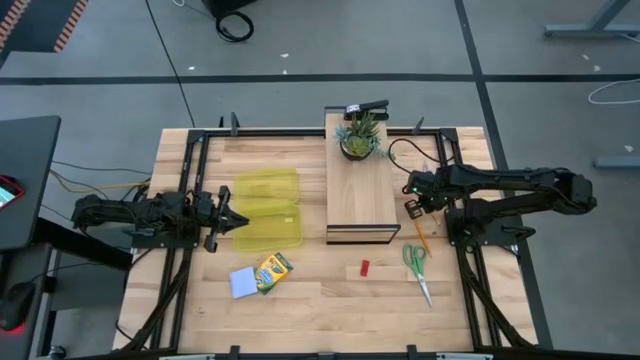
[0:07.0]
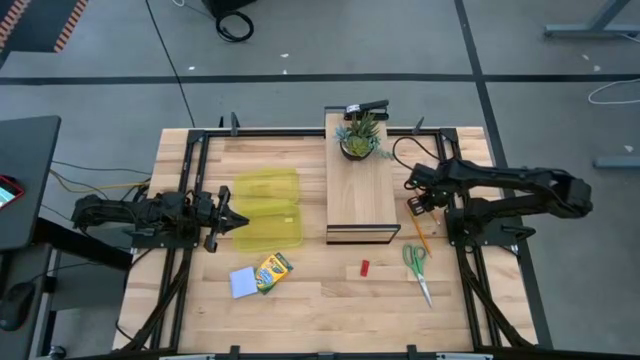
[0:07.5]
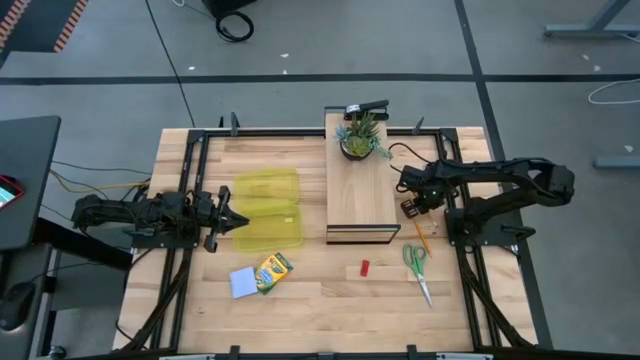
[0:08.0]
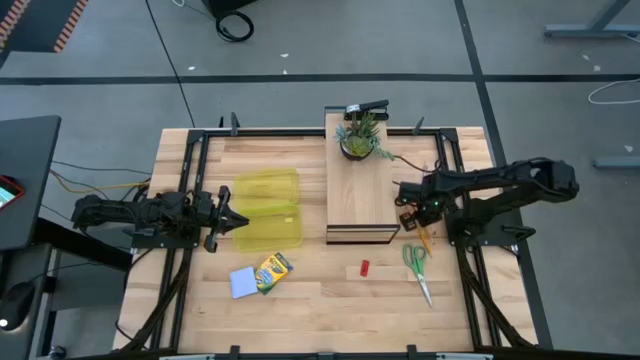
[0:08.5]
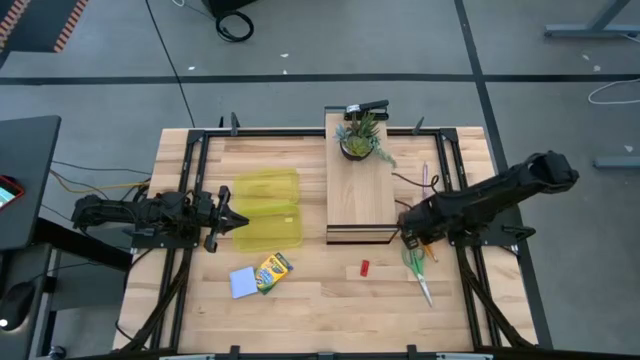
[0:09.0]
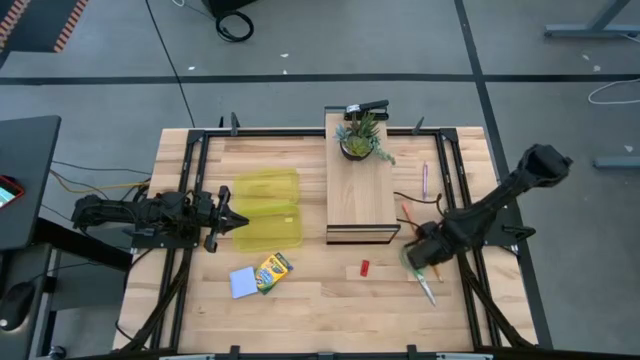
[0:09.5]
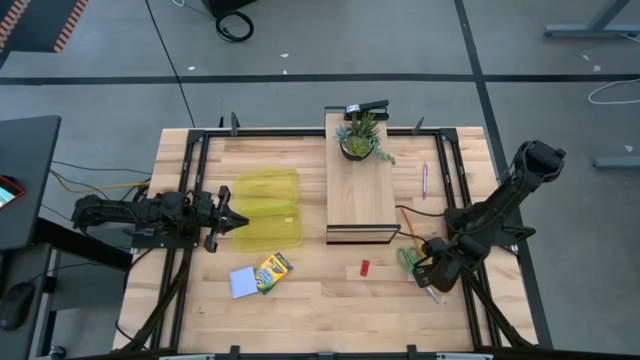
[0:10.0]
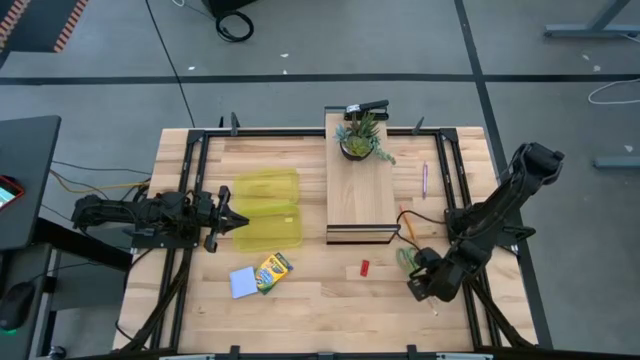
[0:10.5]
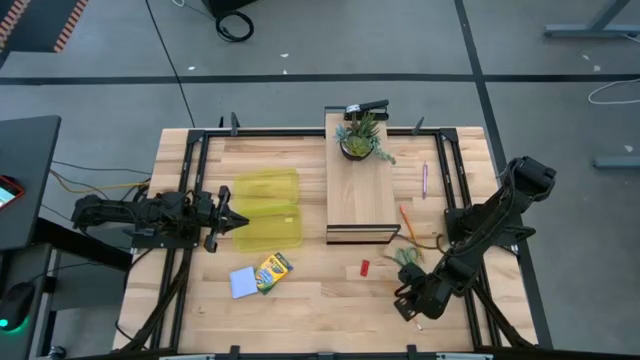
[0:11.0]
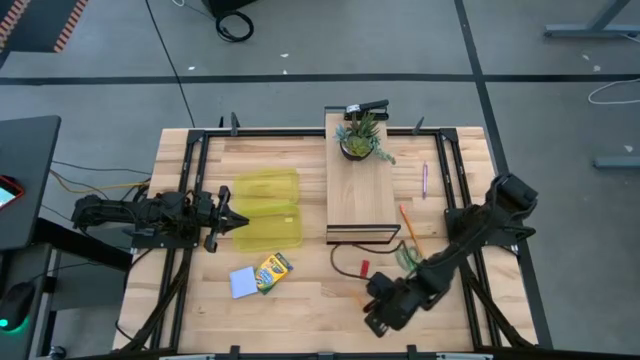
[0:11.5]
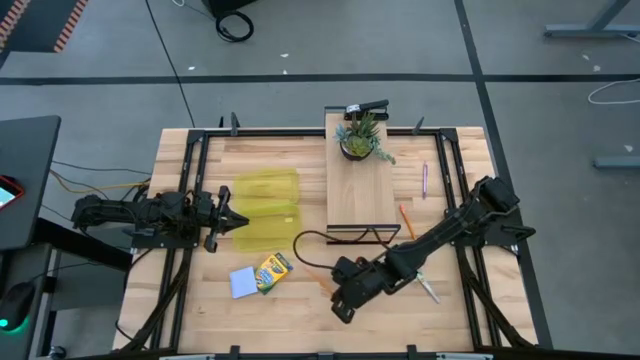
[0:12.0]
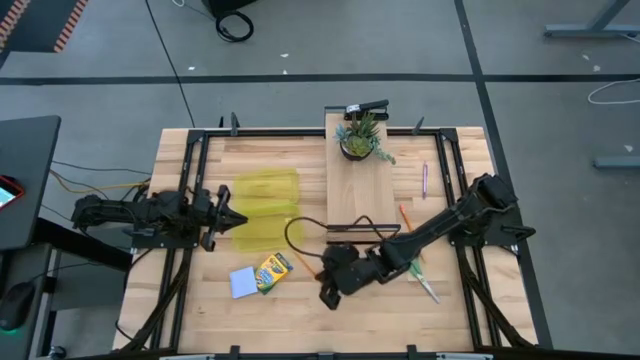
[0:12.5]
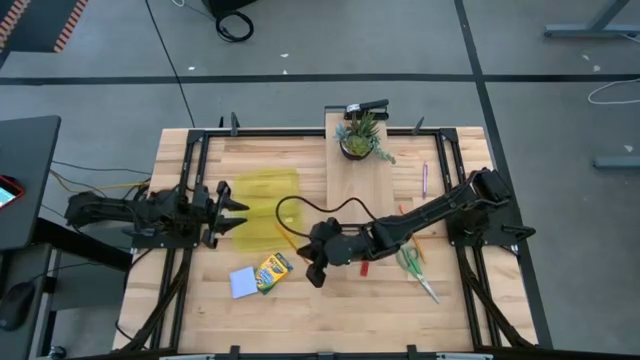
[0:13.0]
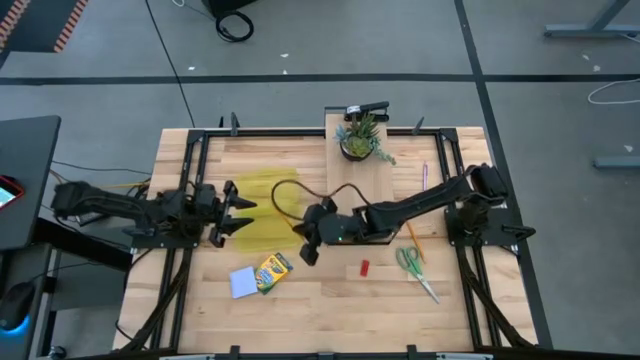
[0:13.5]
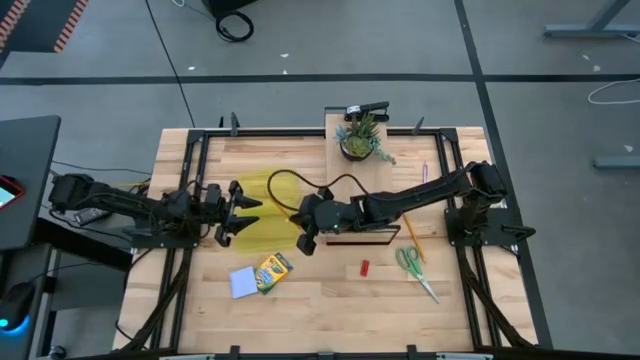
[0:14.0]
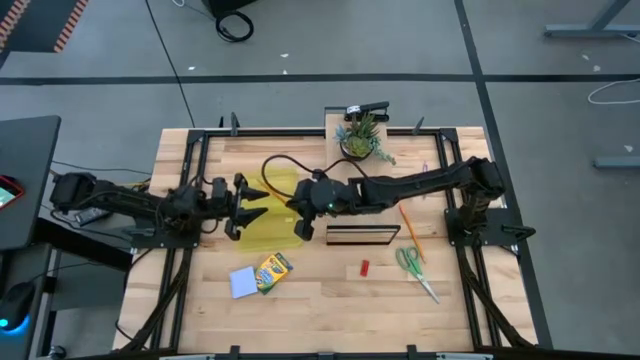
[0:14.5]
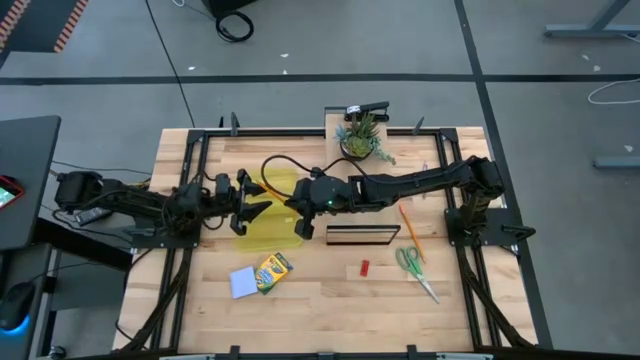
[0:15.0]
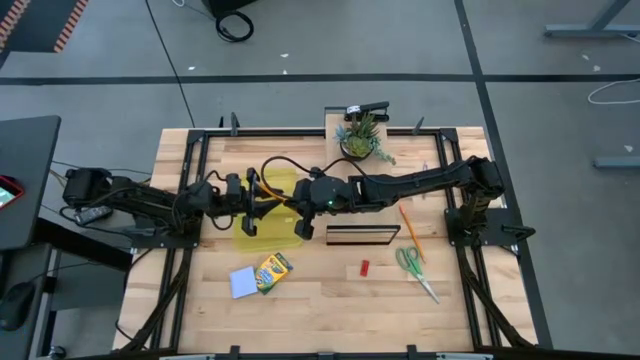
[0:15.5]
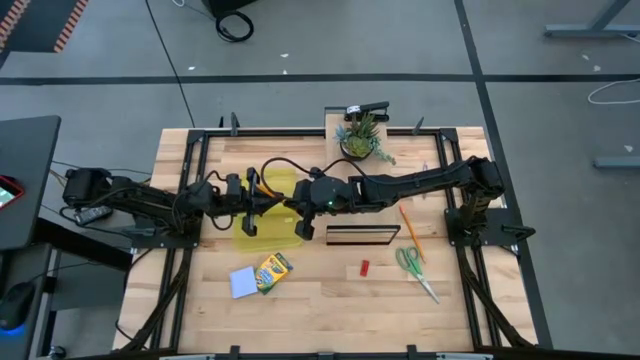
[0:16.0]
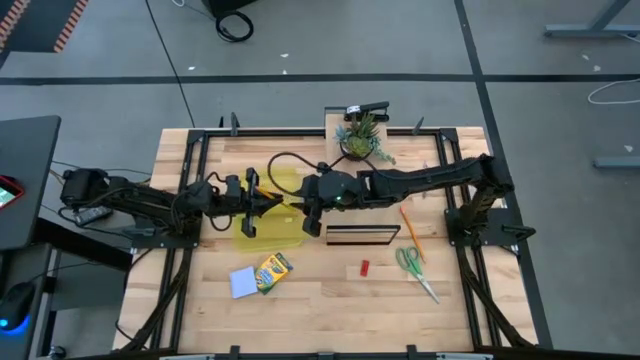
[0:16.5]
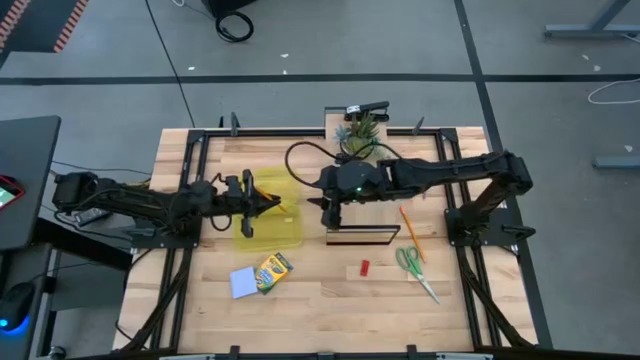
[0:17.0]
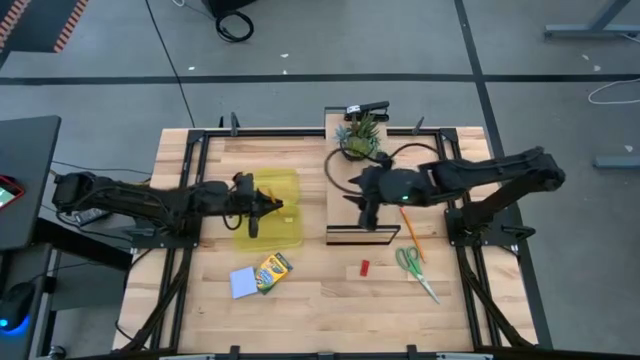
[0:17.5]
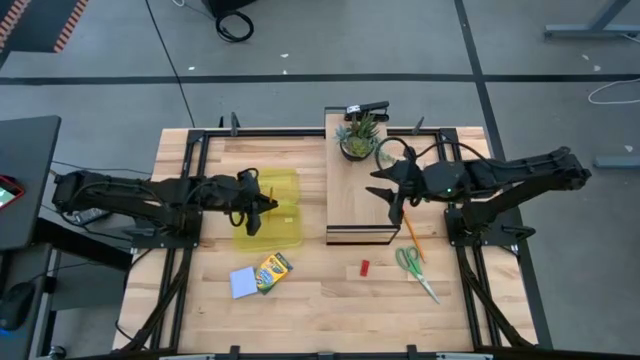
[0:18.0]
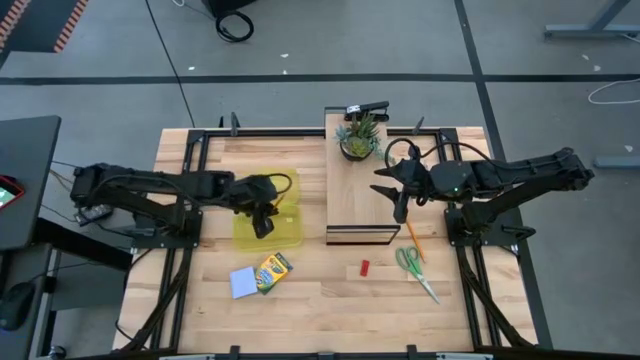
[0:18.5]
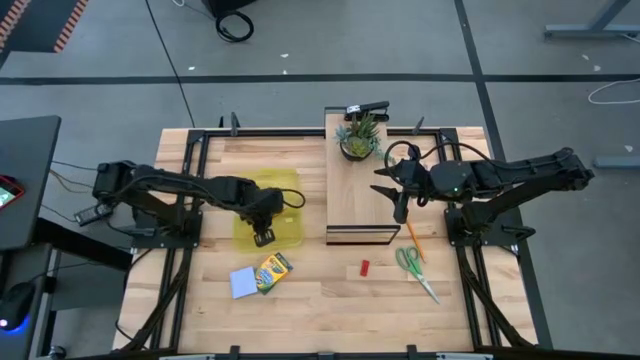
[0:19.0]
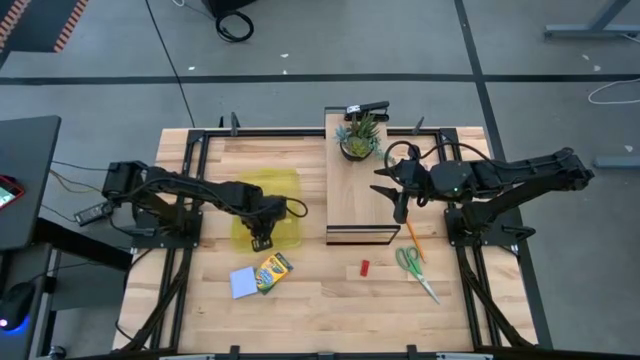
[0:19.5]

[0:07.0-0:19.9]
Task: Pack school essentials
Put the orange pencil into the yellow supply box

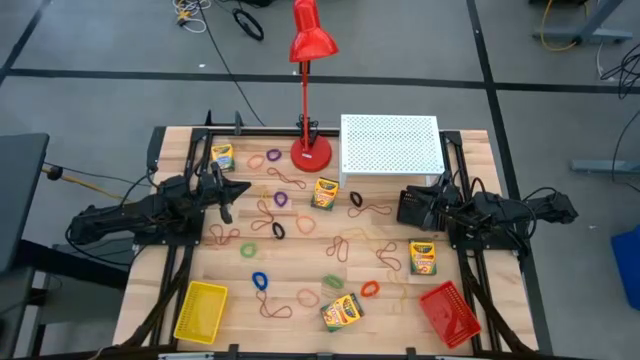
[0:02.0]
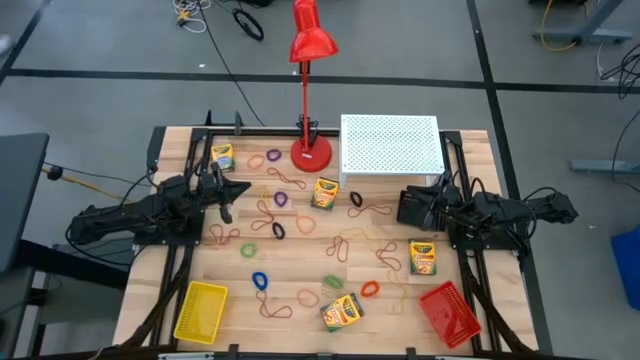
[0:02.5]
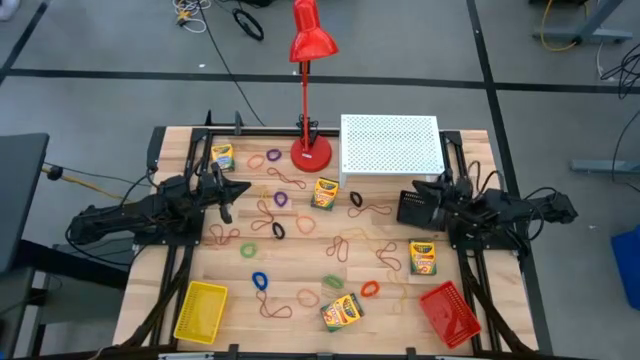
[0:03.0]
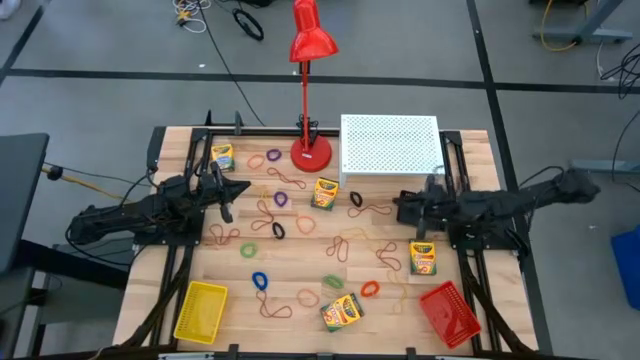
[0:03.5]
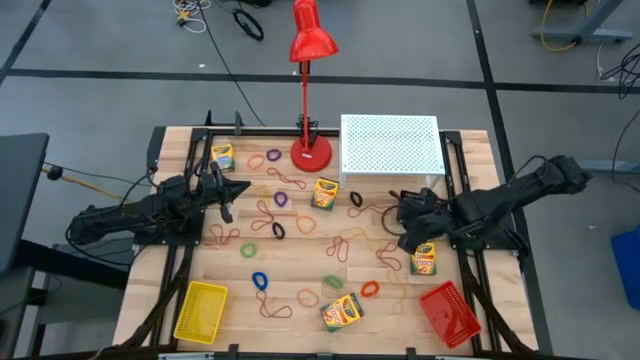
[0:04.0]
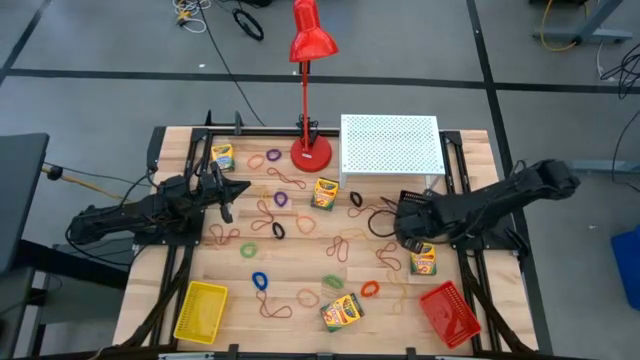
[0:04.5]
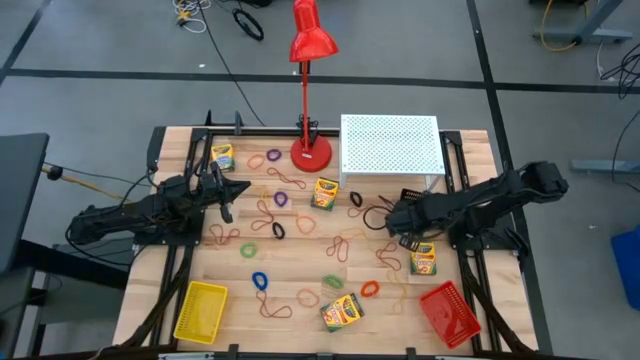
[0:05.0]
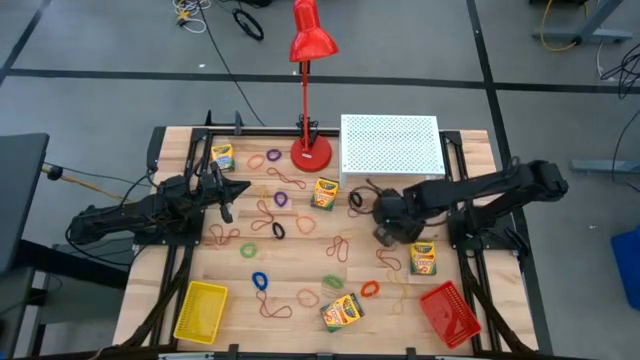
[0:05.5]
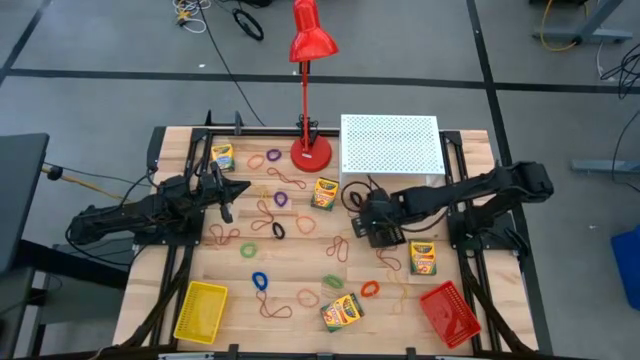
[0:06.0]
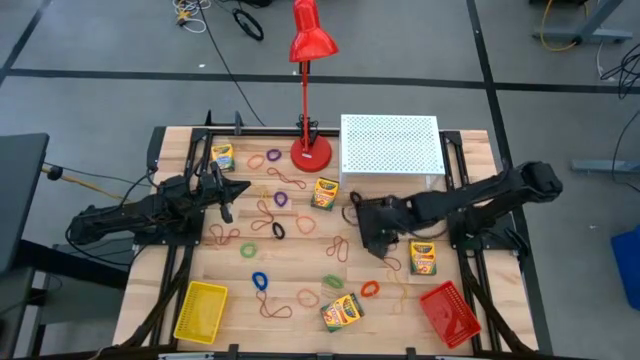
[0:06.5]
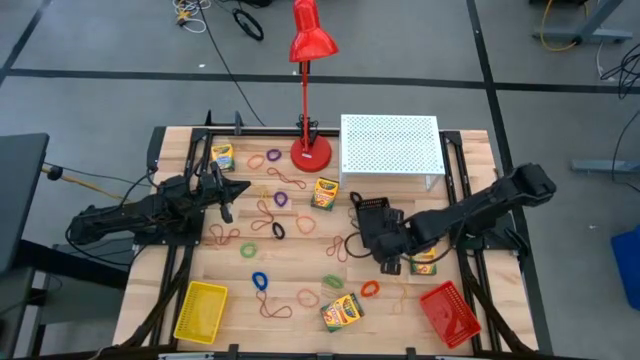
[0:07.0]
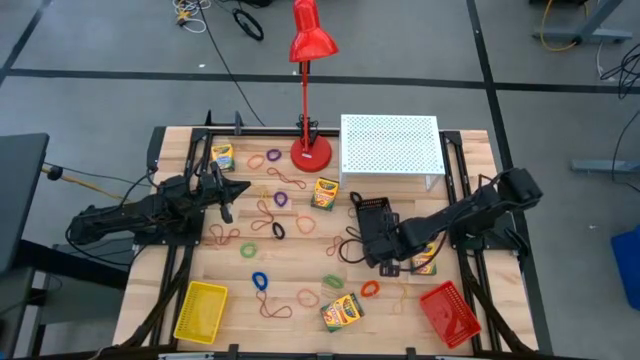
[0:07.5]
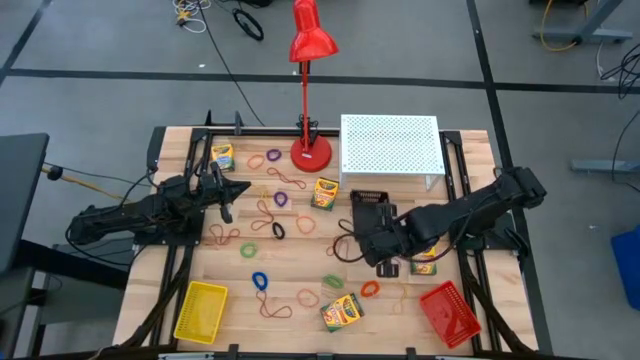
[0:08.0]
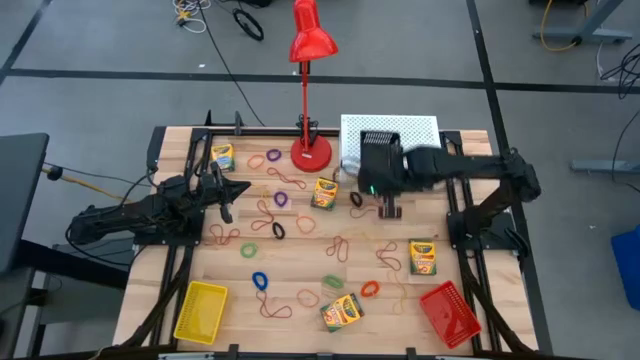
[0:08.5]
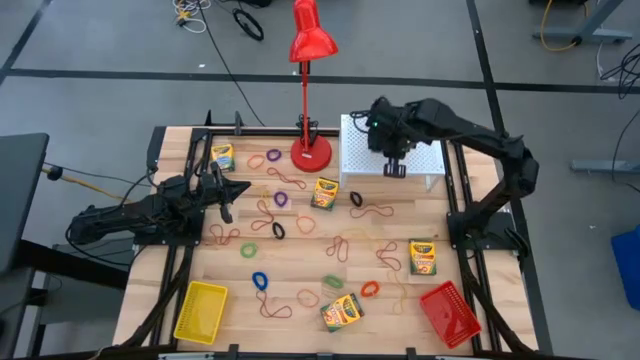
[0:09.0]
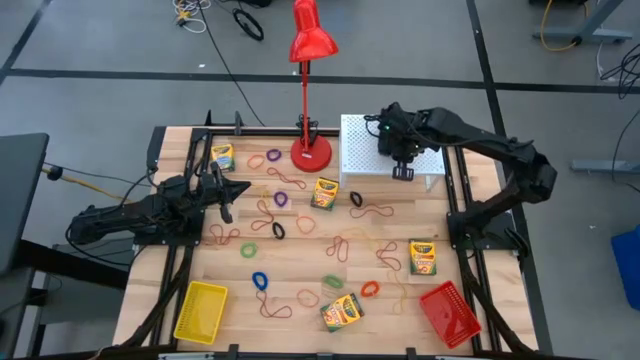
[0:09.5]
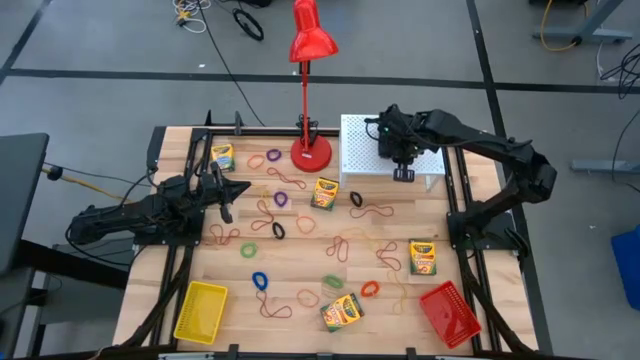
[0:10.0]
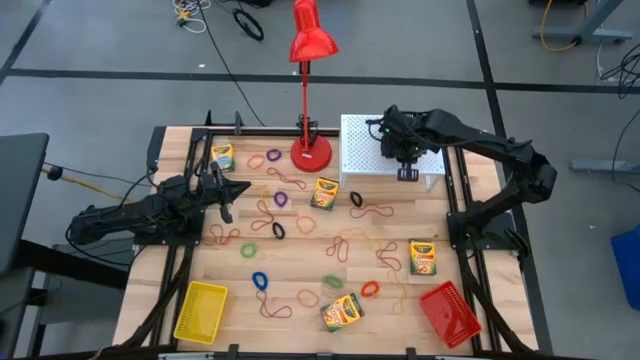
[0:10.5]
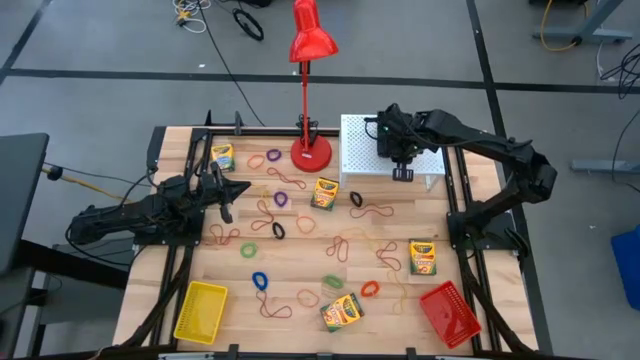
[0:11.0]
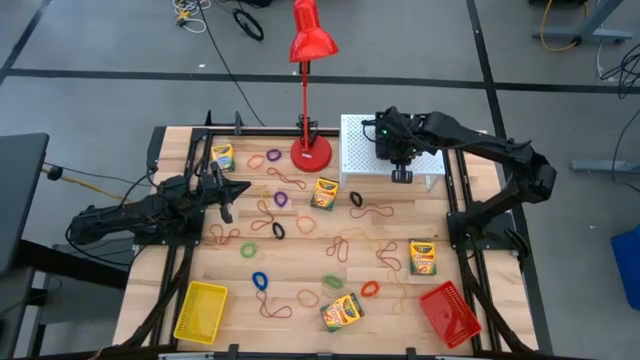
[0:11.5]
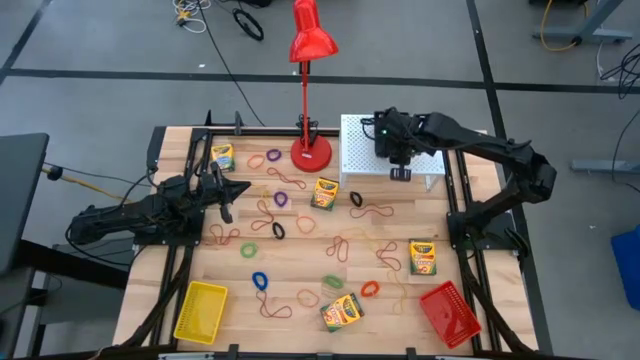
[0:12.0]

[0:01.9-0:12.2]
Task: Pick & Place Office Desk Supplies
Put the black bin on the shelf
